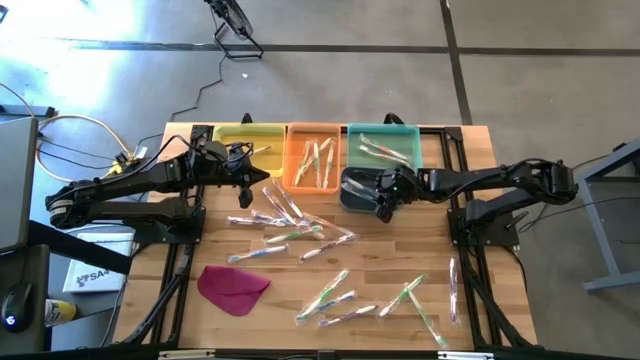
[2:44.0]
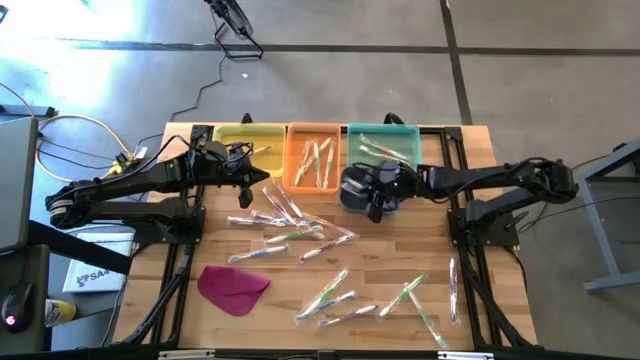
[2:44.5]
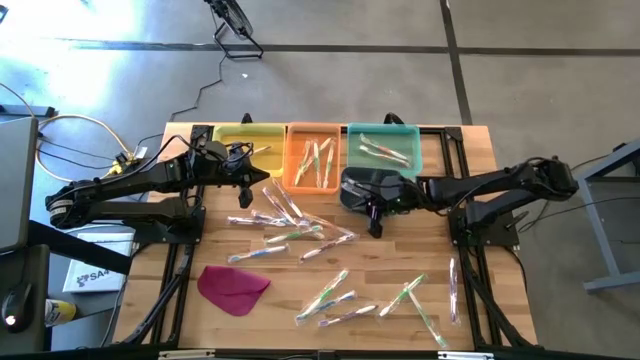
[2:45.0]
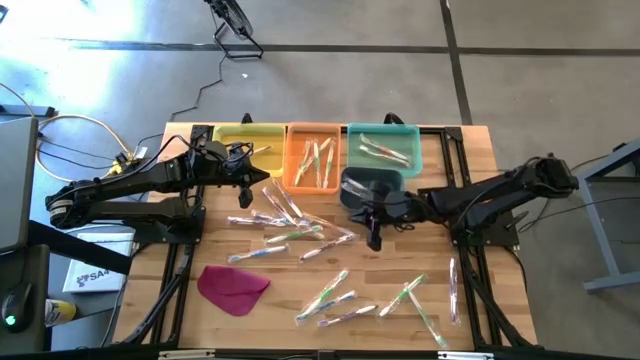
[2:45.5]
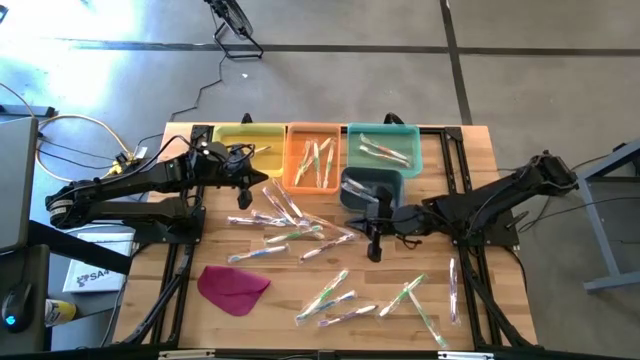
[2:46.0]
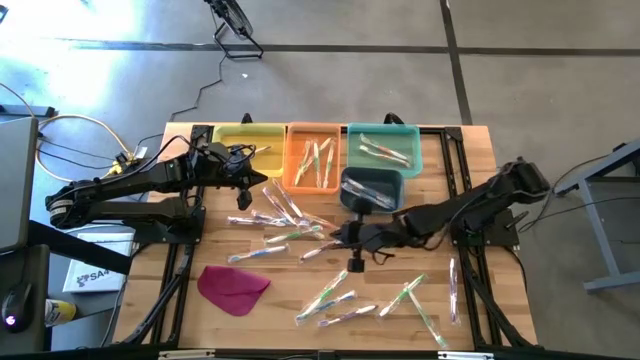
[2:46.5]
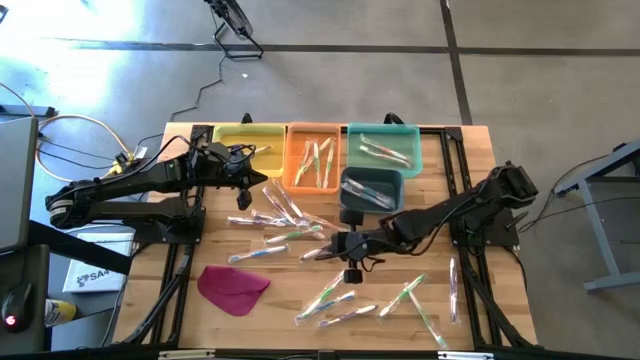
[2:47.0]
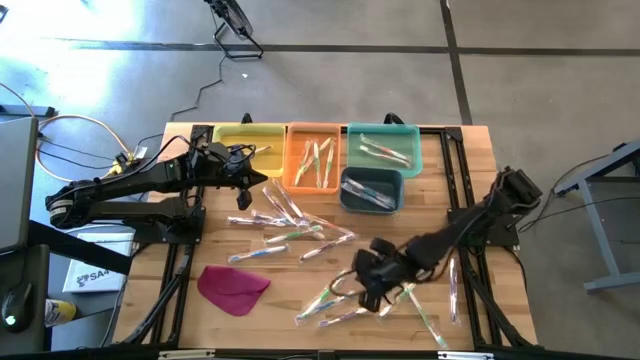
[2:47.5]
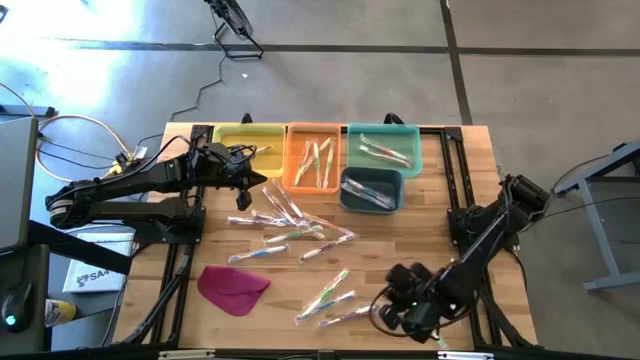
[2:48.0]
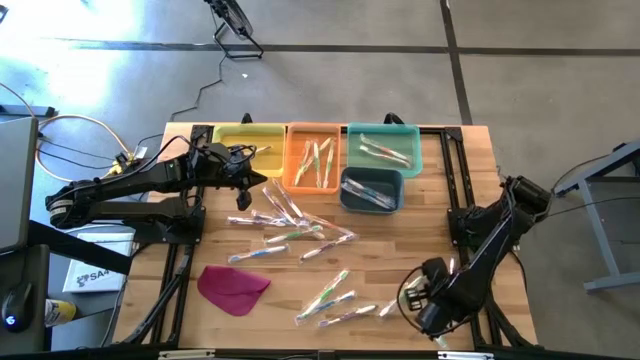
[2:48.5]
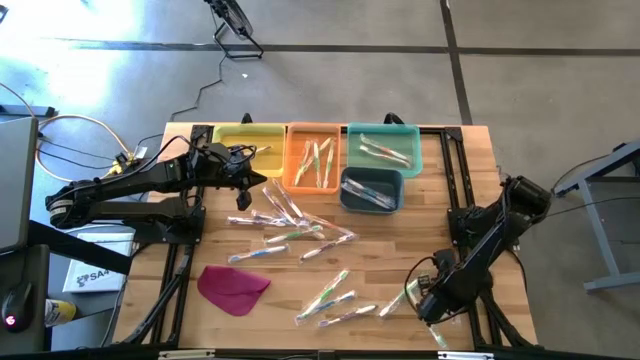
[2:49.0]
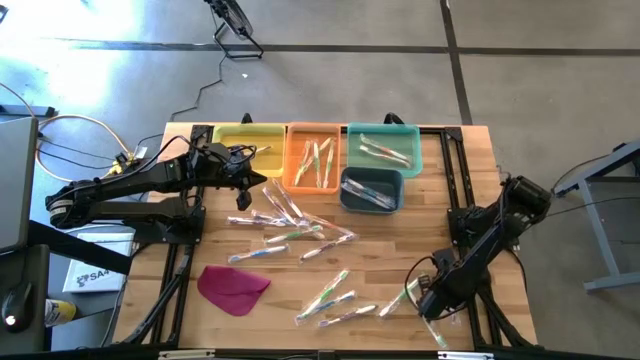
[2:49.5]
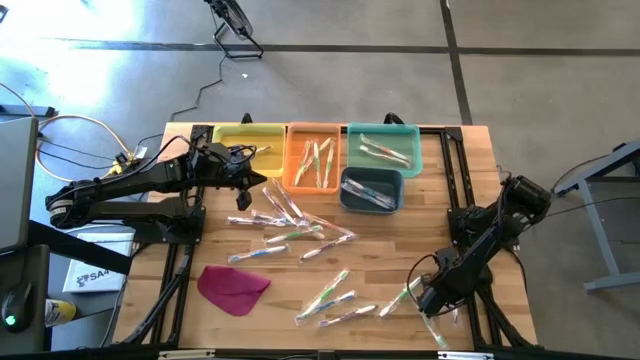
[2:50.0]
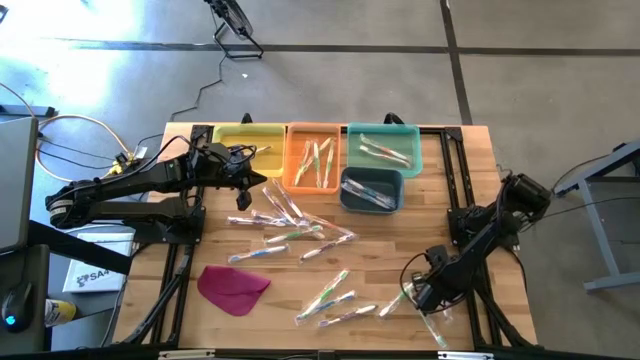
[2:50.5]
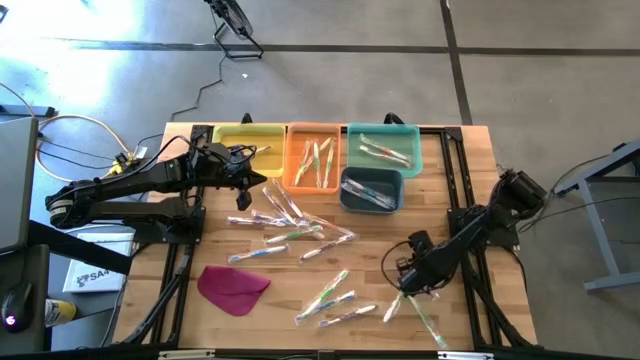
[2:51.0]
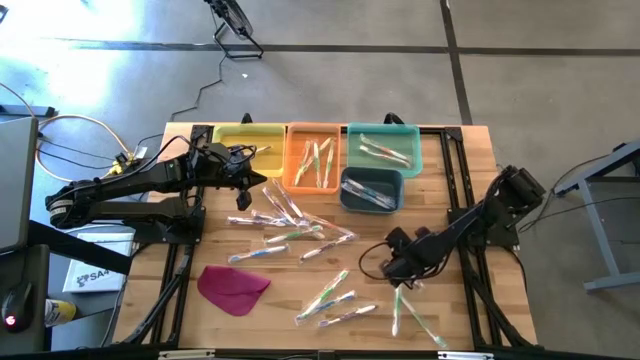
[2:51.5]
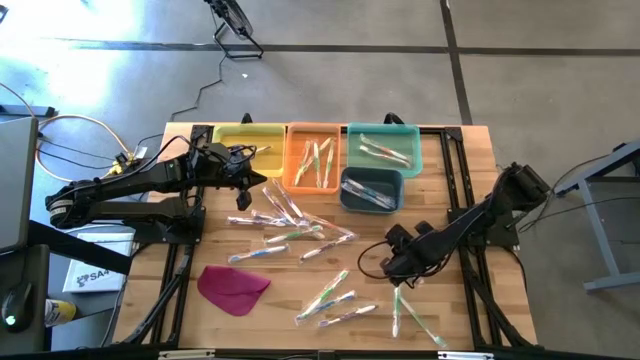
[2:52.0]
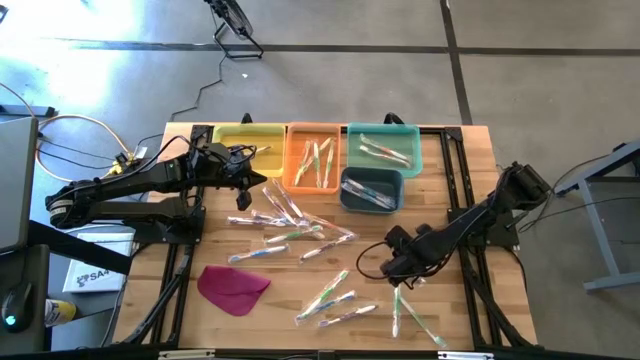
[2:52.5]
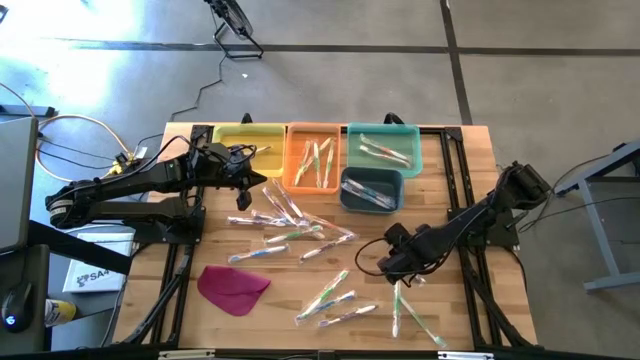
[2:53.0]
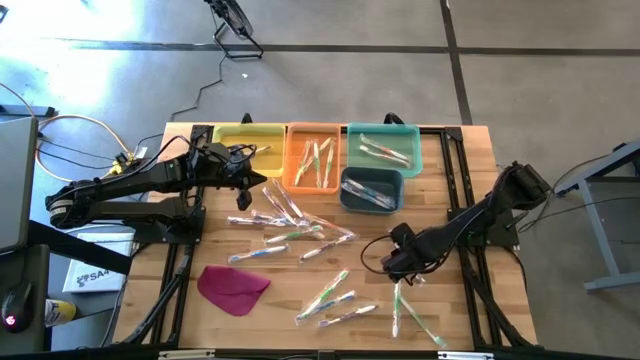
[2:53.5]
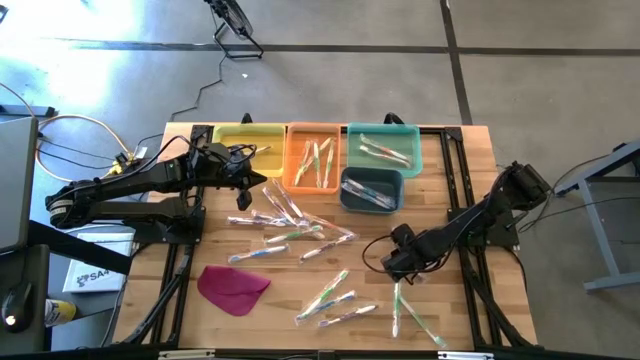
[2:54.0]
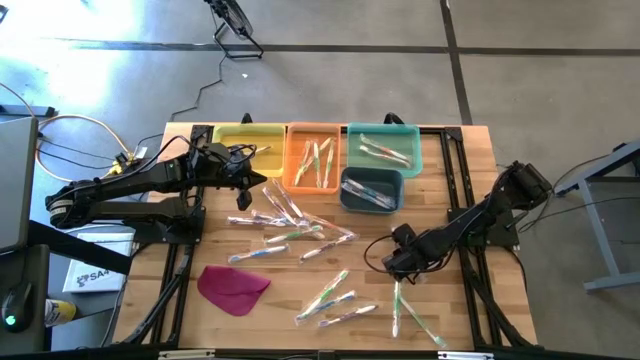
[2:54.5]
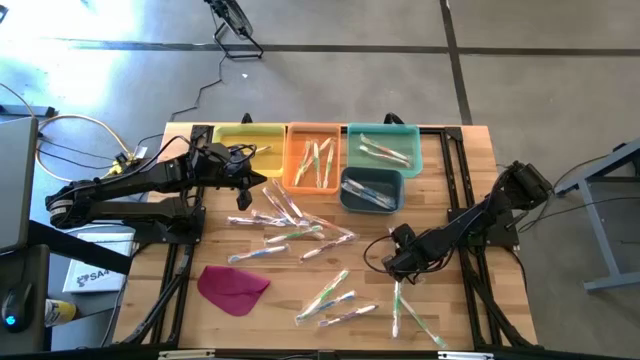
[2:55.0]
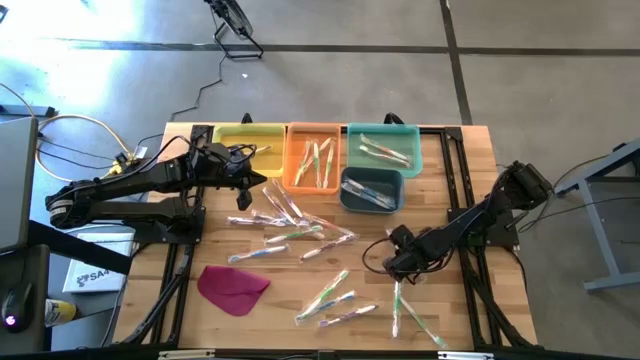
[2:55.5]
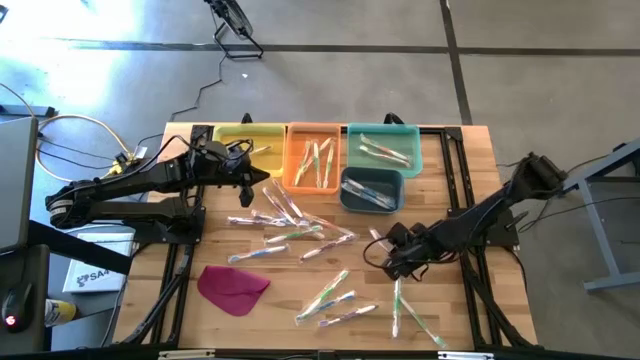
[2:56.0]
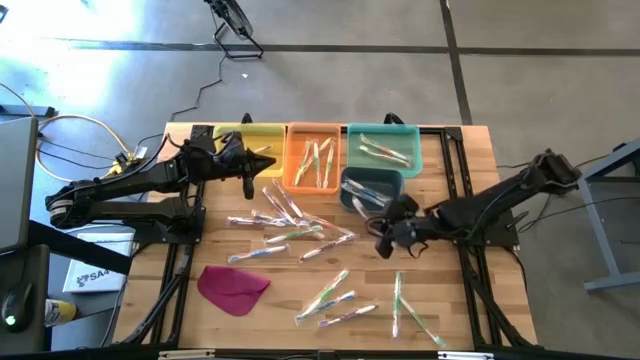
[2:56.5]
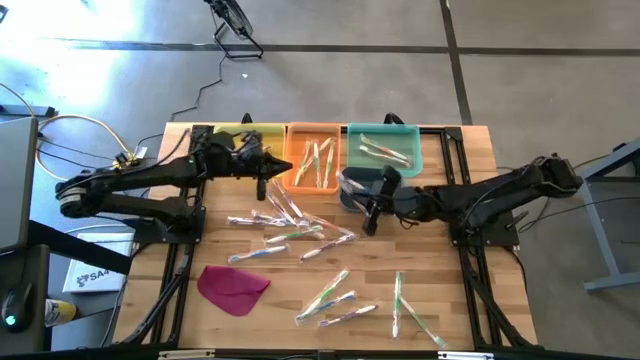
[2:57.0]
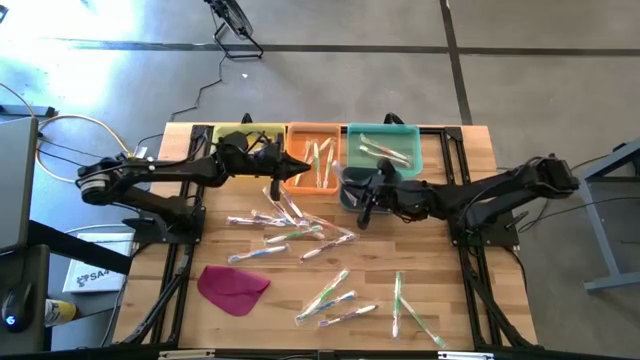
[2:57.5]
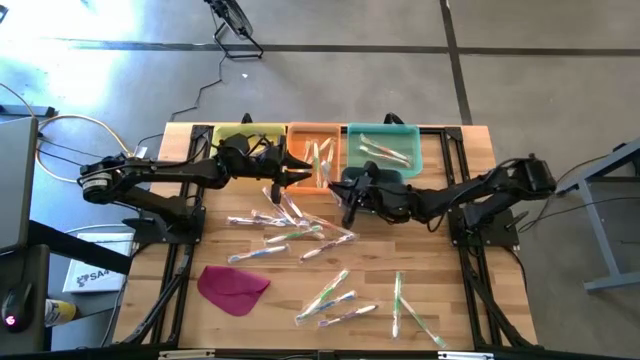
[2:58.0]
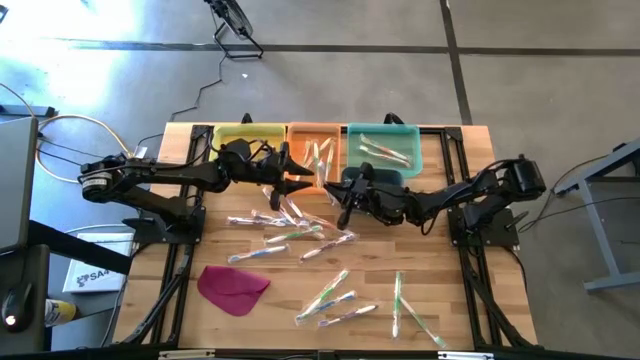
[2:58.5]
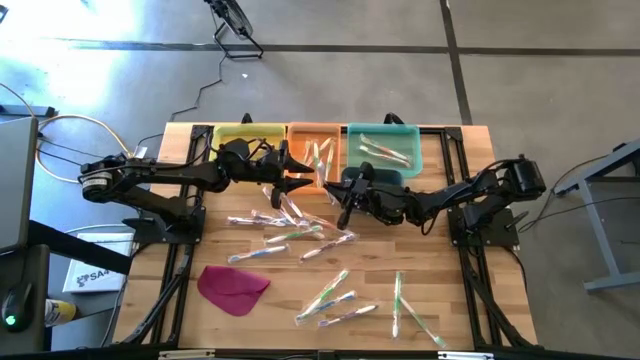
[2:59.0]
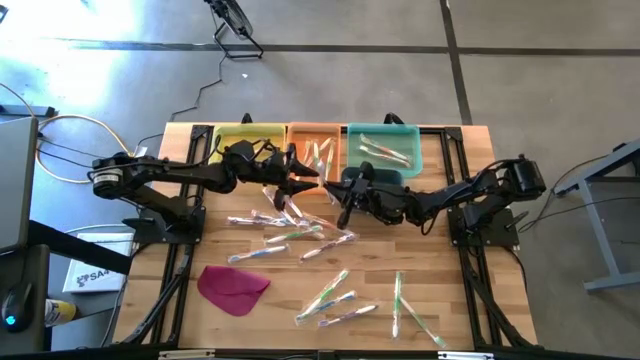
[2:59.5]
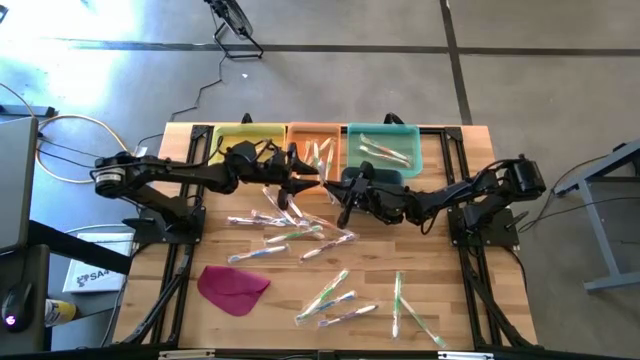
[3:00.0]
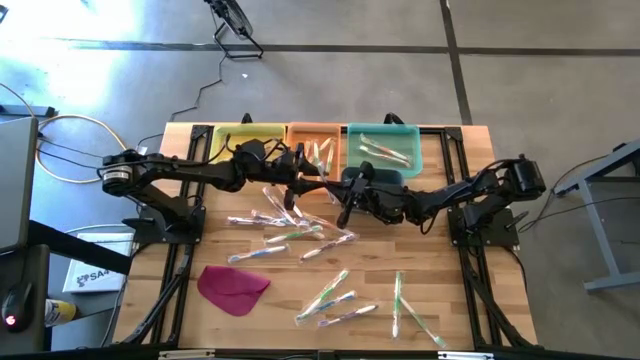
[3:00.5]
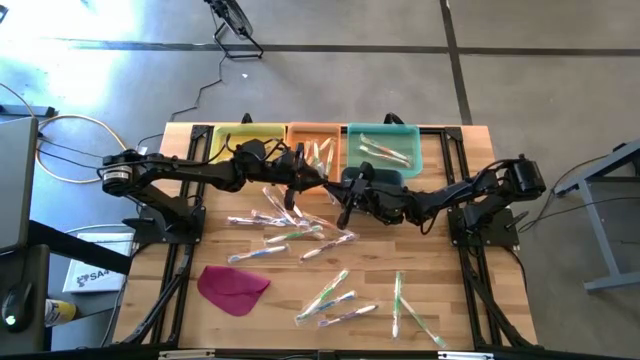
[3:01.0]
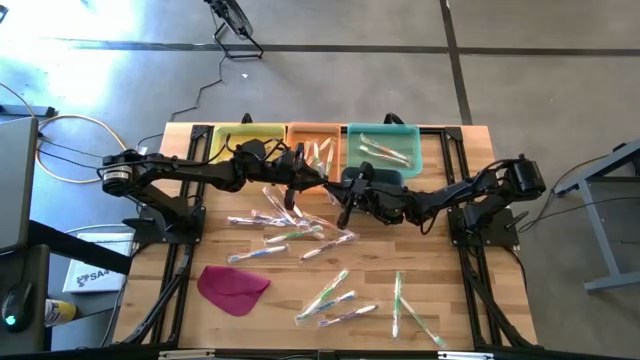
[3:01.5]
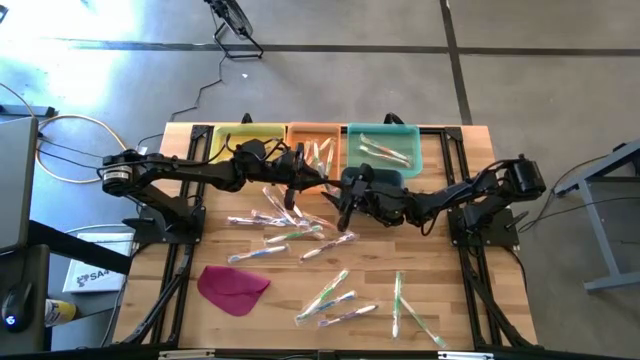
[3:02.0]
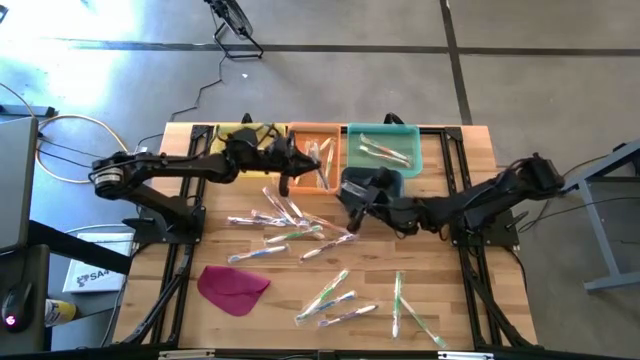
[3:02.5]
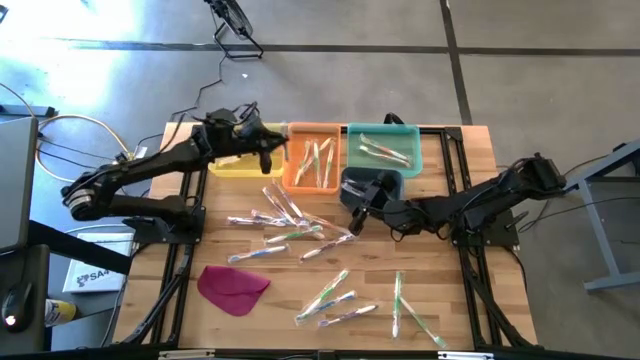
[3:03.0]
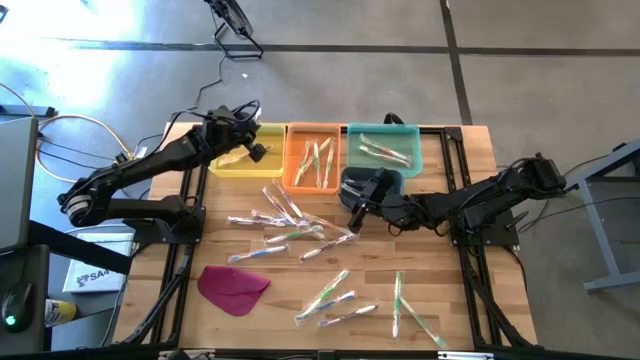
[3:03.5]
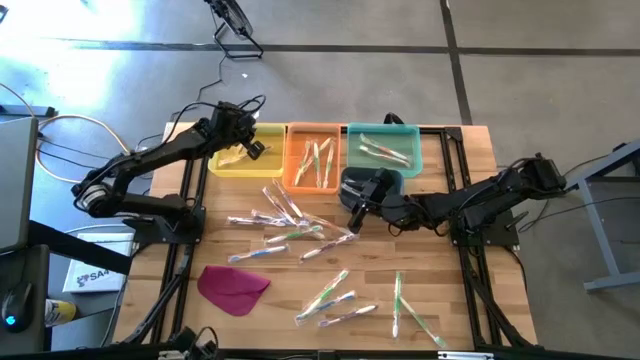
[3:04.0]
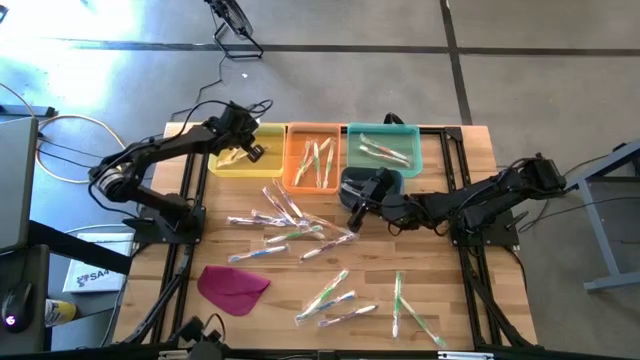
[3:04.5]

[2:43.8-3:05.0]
Task: Pick & Place Toothbrushes
Put the violet toothbrush into the yellow bin

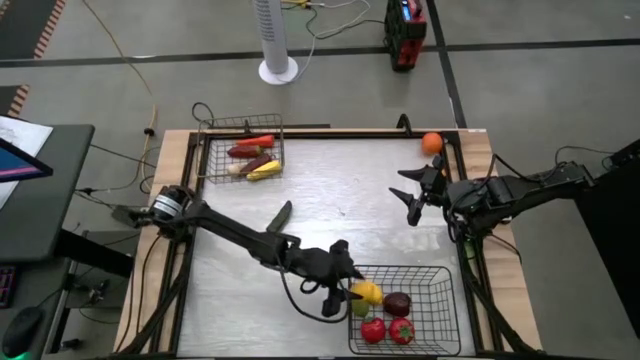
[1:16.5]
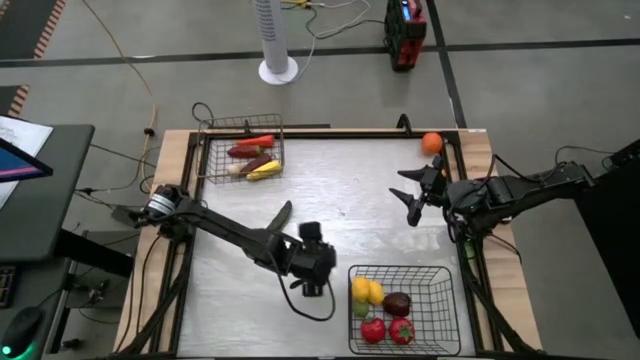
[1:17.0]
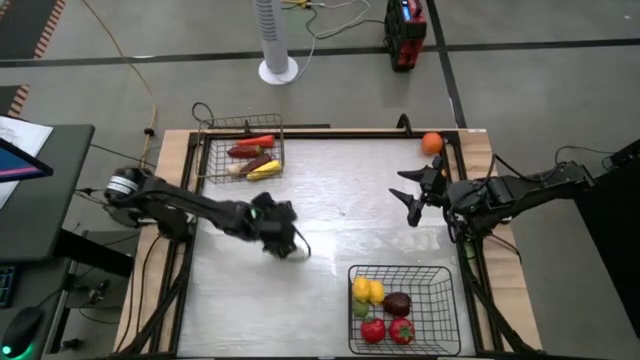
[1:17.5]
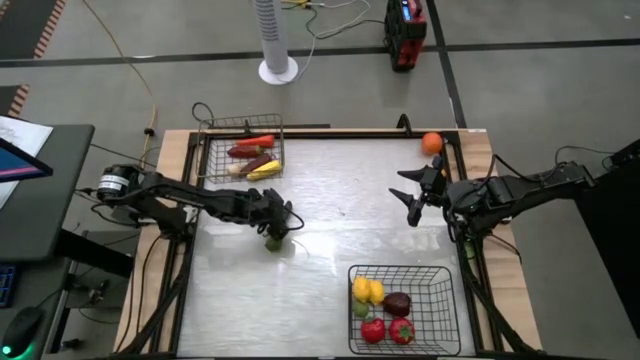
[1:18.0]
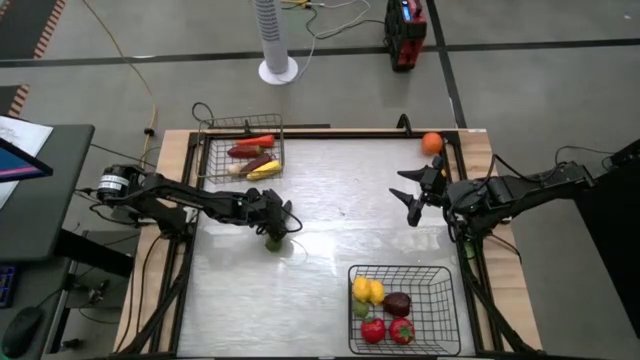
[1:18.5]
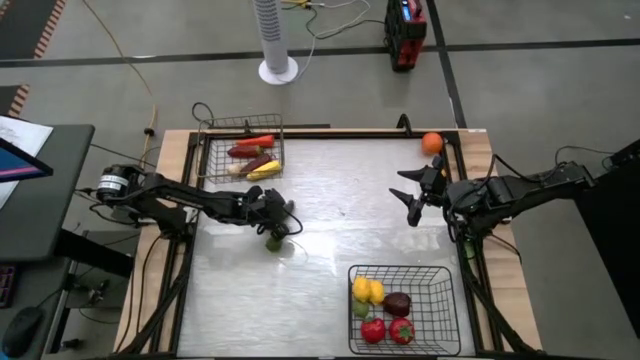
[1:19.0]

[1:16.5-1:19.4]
Task: Sort produce into baskets
Put the green chili pepper into the top wire basket
